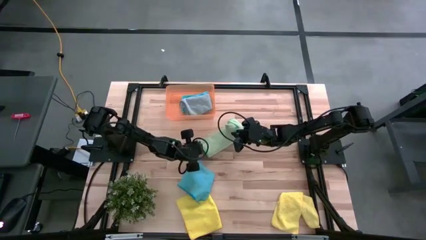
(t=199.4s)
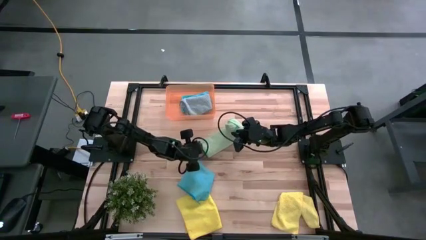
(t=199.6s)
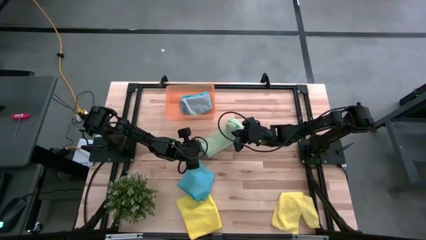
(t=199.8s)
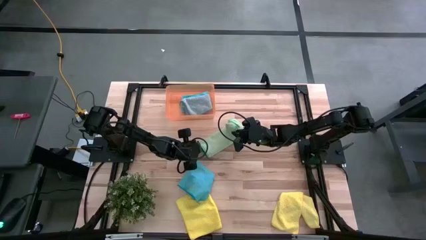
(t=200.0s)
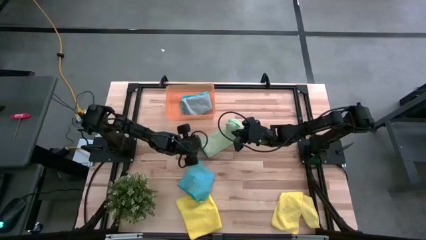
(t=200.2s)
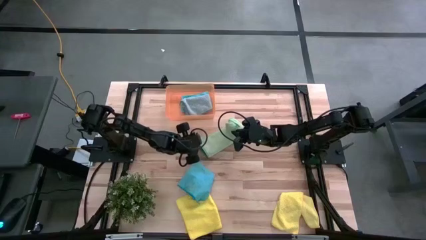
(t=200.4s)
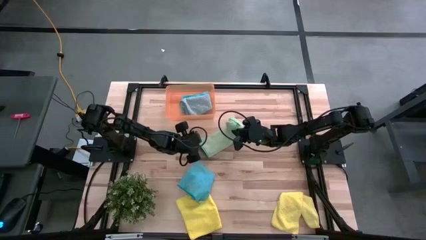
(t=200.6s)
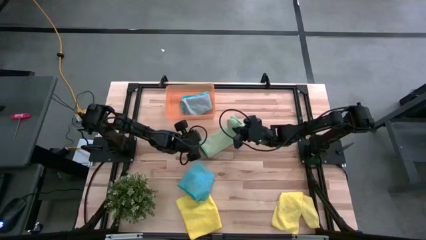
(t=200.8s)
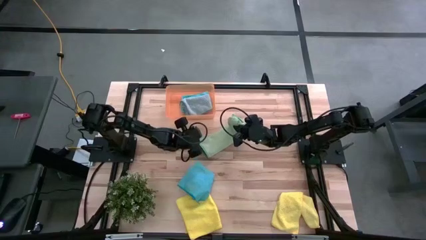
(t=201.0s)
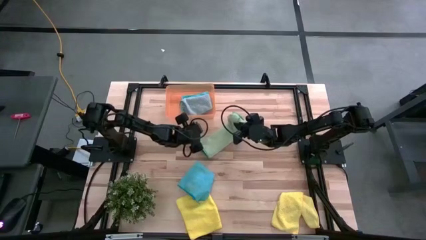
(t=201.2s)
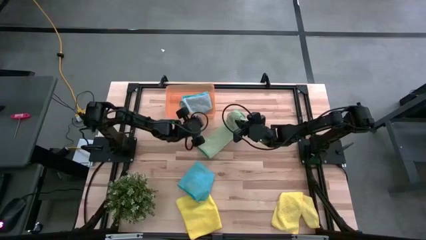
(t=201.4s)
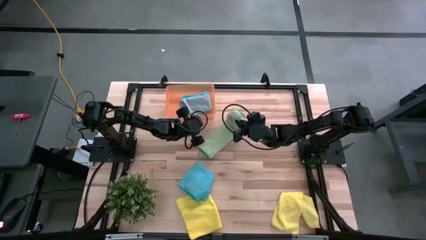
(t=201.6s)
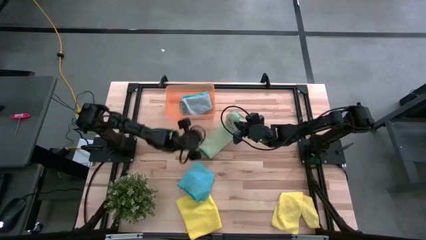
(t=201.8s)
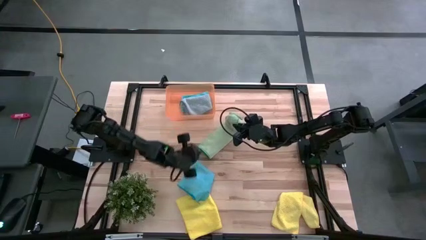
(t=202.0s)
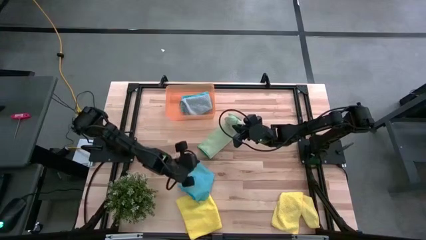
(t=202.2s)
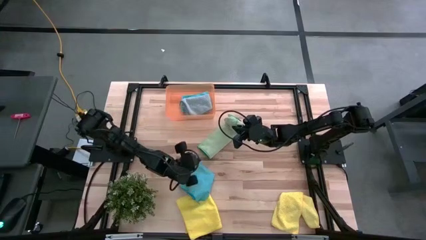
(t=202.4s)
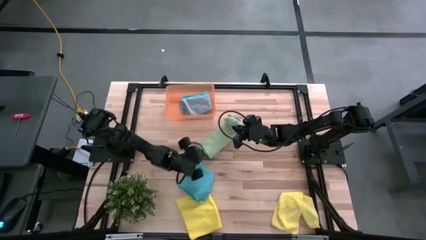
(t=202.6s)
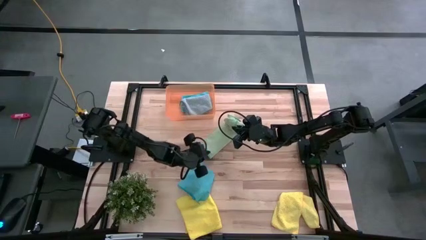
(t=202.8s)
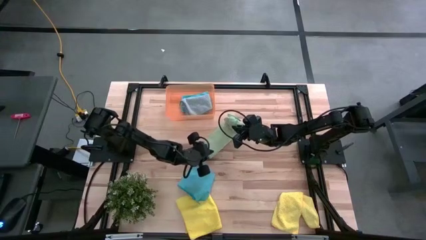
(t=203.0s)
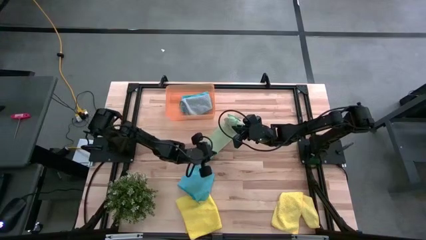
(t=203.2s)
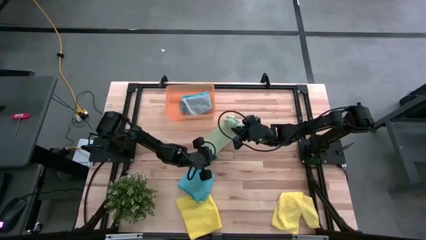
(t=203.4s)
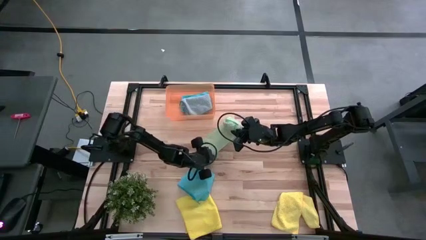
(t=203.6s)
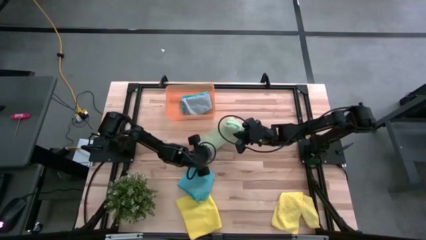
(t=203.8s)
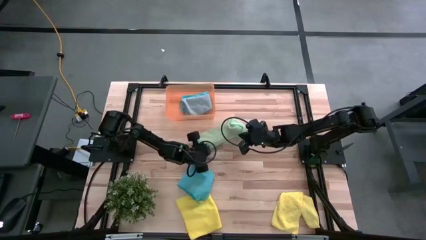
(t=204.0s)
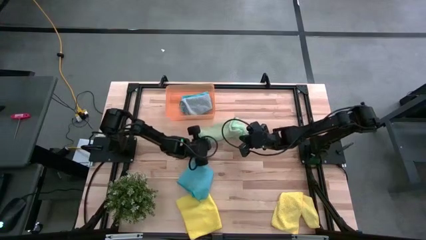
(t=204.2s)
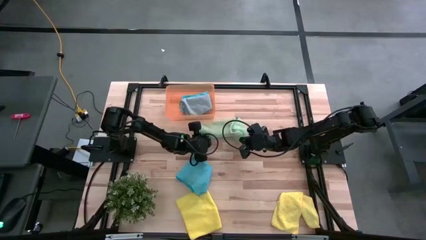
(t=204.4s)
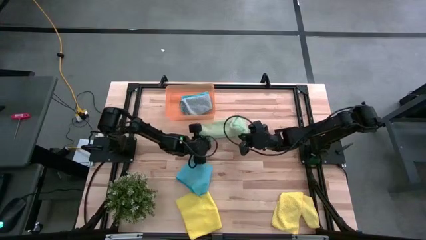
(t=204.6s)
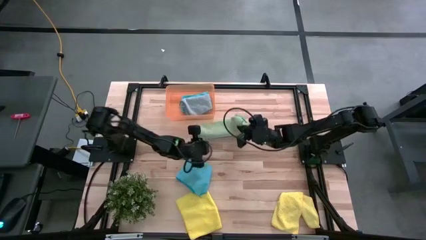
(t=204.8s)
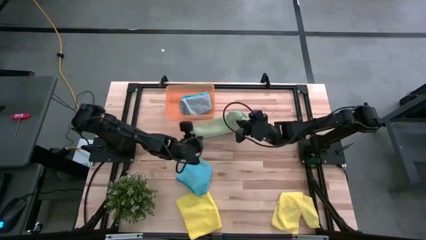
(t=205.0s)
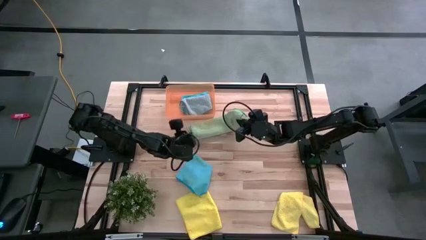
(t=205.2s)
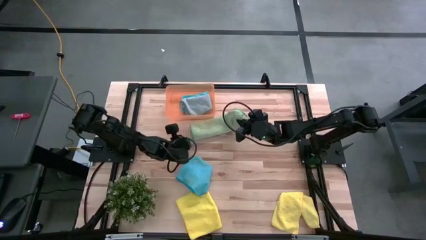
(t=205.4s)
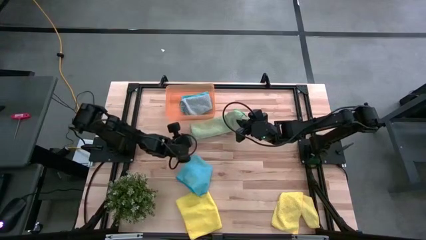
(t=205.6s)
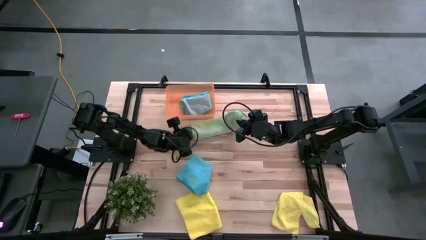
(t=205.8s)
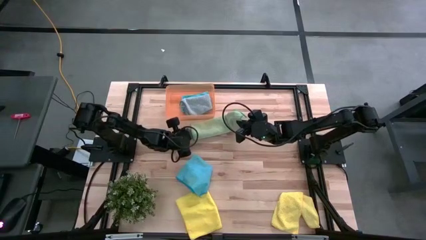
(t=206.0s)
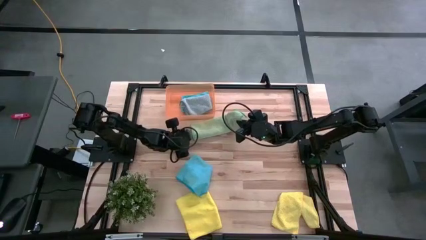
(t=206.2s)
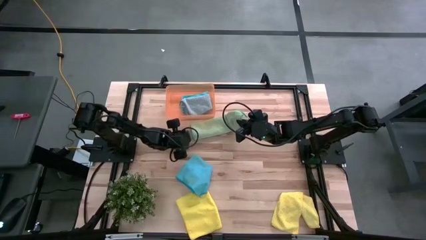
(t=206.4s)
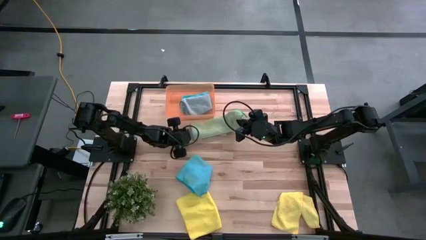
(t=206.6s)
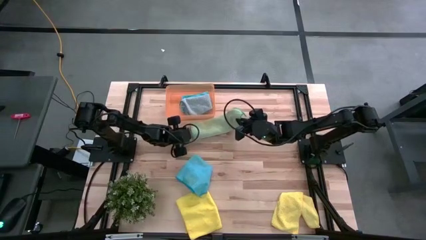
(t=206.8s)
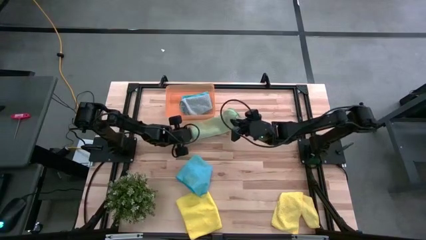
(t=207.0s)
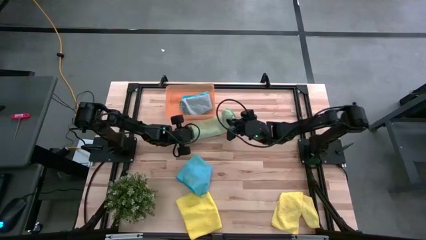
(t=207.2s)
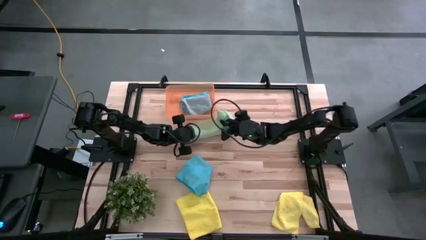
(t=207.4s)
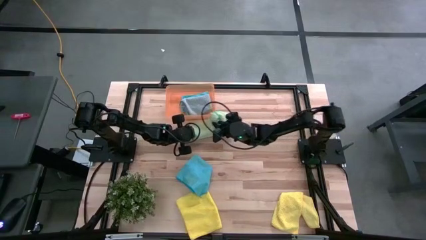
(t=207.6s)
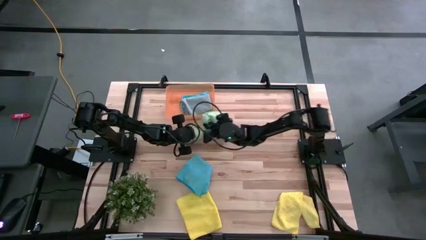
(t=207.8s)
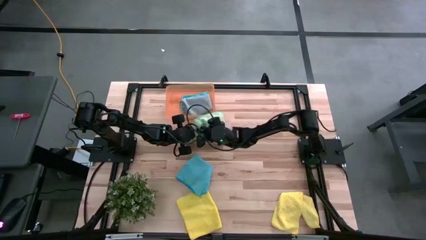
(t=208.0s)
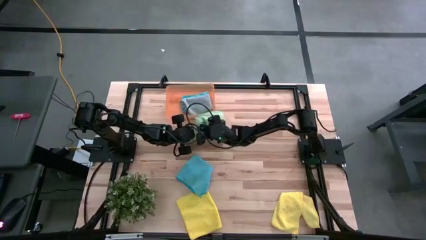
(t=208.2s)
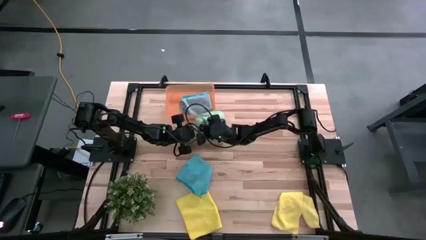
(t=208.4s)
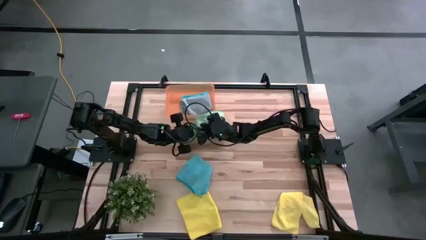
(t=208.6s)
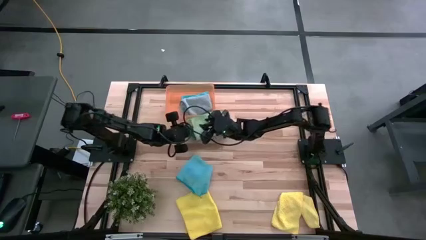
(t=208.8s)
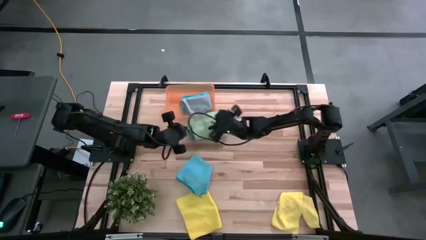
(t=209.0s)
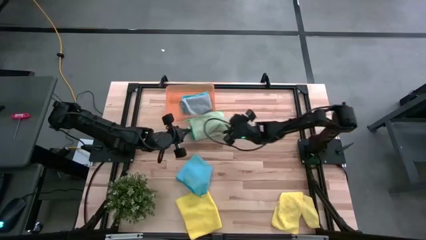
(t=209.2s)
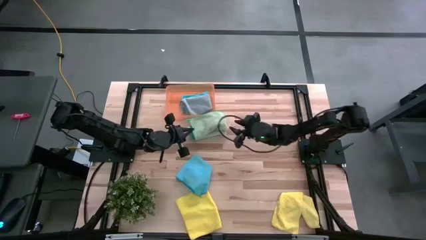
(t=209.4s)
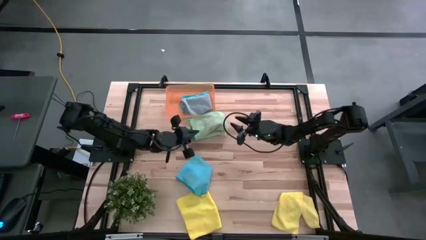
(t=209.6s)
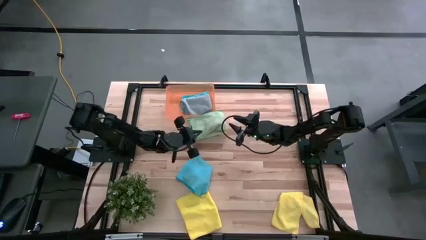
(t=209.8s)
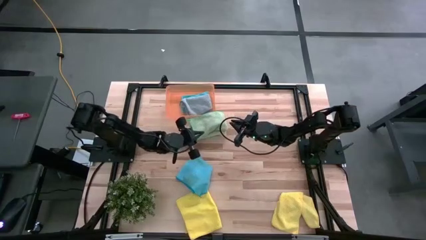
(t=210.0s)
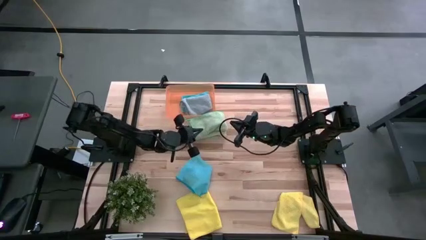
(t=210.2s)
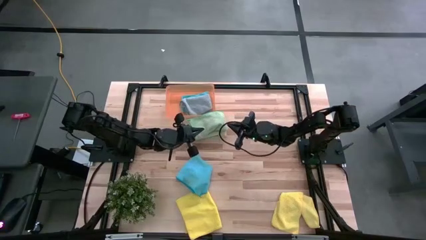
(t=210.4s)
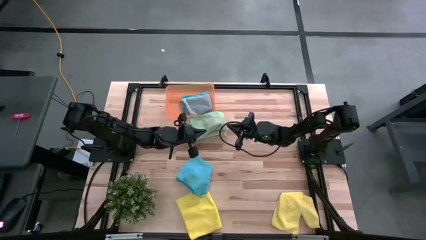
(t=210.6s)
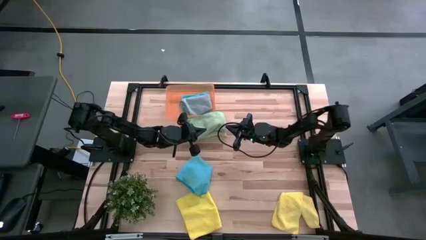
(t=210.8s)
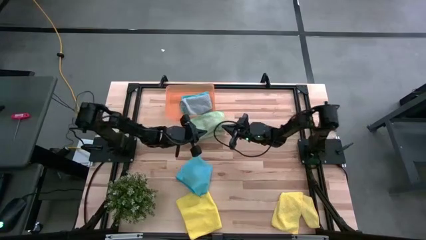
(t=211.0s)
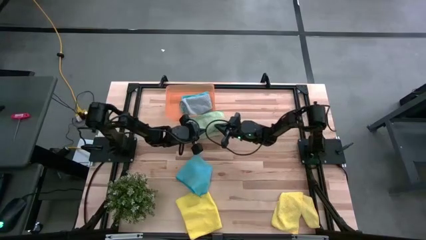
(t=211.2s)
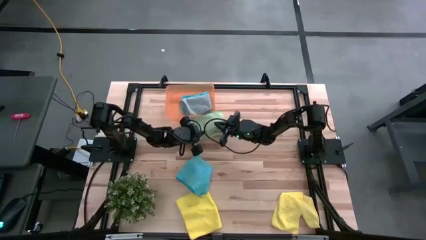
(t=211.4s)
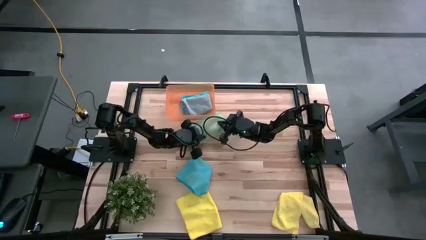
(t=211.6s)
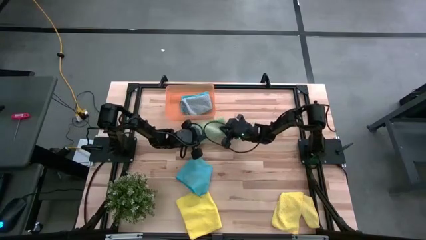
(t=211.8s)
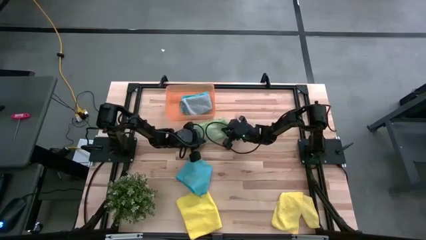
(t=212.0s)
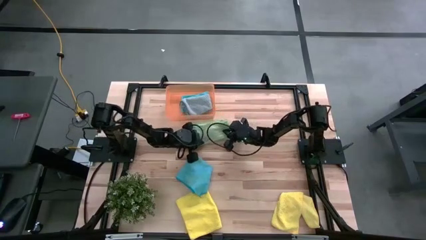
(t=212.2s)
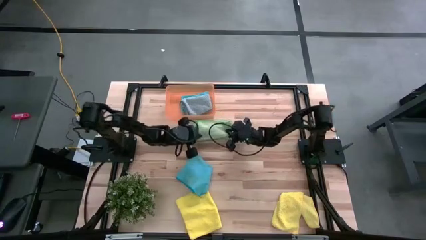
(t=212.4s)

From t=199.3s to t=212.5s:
Task: Fold microfiber towels
Fold the green microfiber cloth

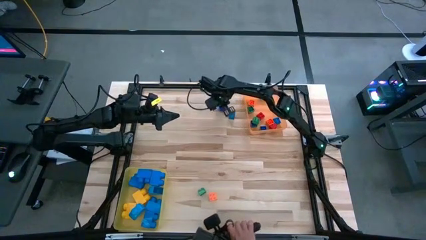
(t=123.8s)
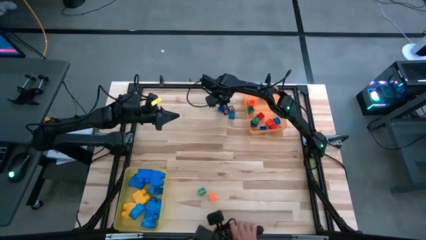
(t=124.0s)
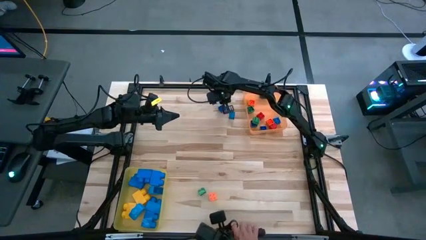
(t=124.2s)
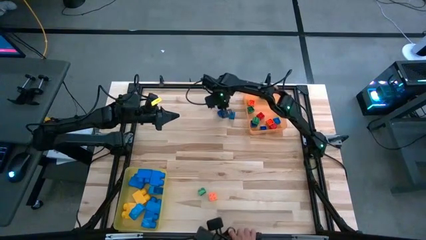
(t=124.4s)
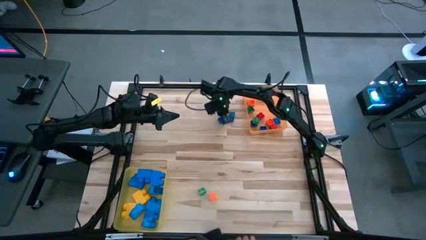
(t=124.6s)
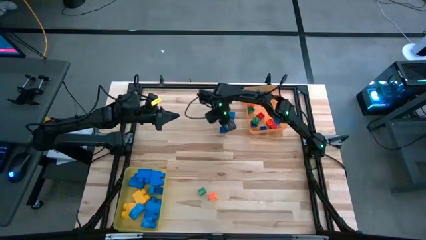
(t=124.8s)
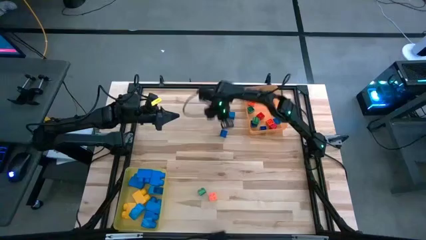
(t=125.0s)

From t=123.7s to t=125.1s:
Task: Sort blocks by size
Move the small blue game piece to the center of the table
